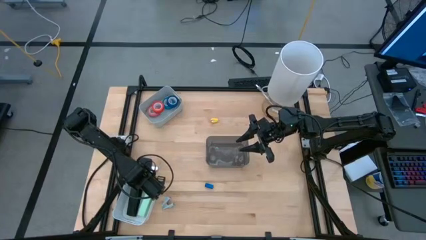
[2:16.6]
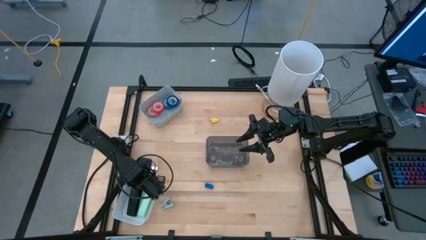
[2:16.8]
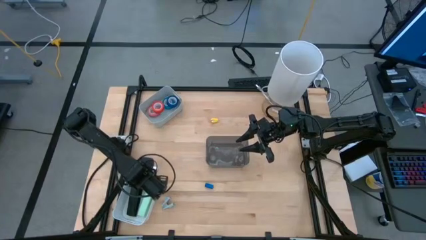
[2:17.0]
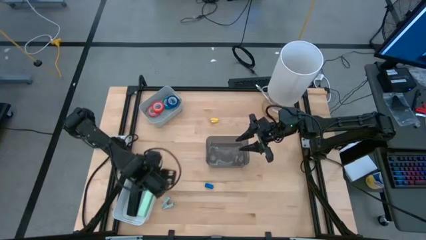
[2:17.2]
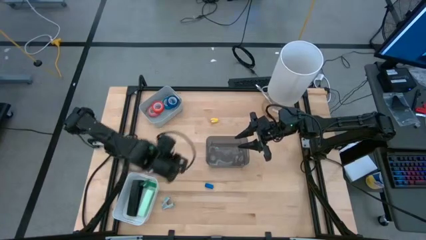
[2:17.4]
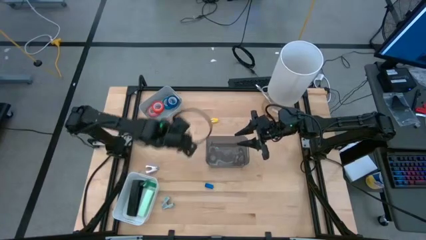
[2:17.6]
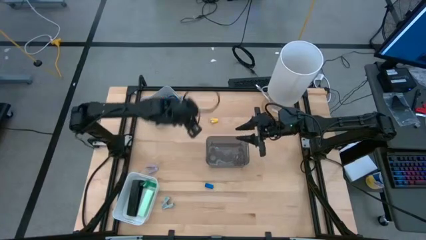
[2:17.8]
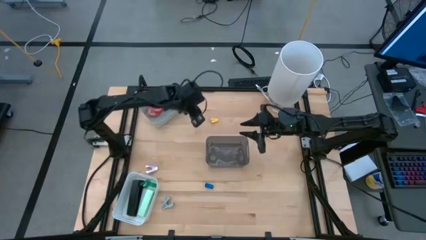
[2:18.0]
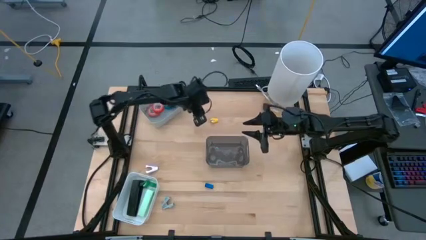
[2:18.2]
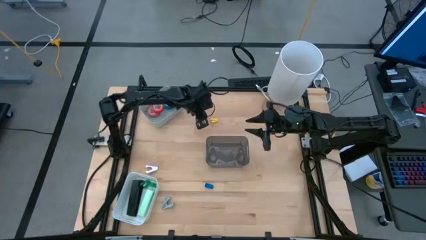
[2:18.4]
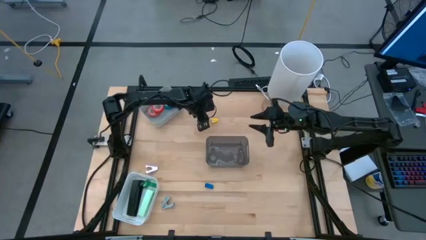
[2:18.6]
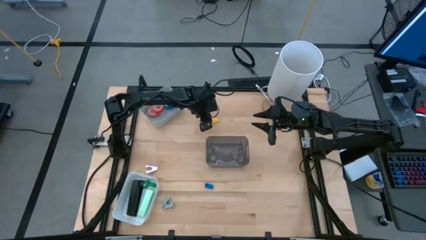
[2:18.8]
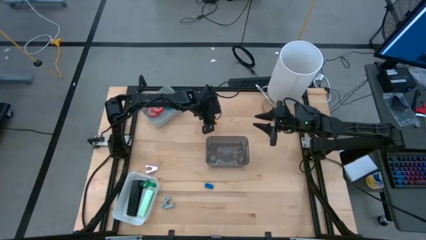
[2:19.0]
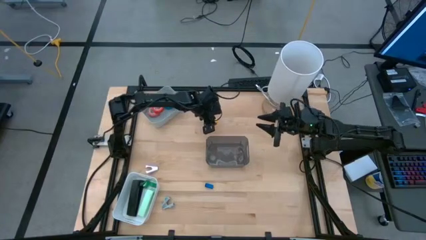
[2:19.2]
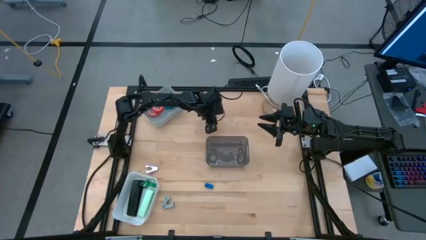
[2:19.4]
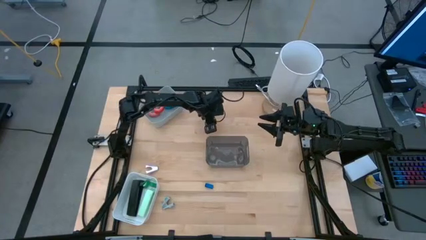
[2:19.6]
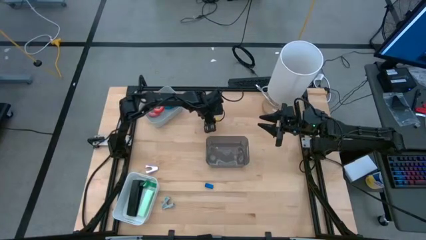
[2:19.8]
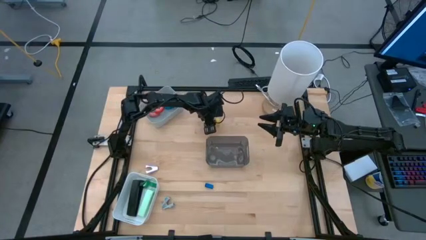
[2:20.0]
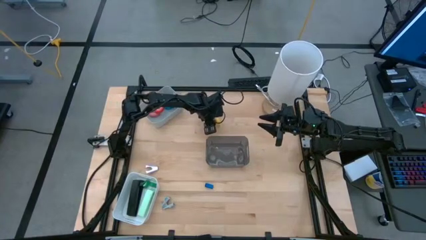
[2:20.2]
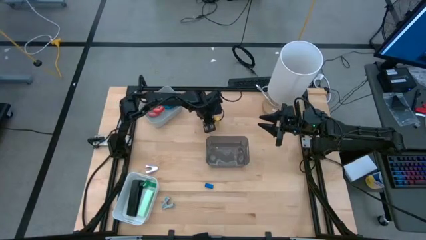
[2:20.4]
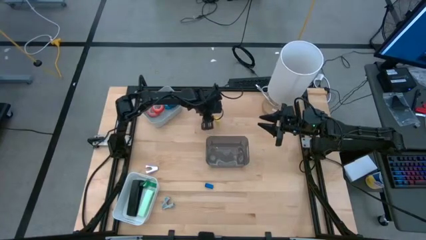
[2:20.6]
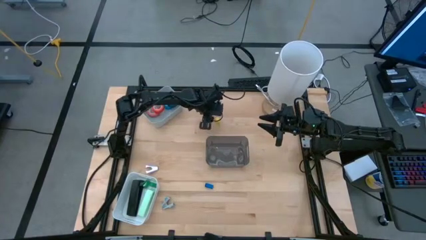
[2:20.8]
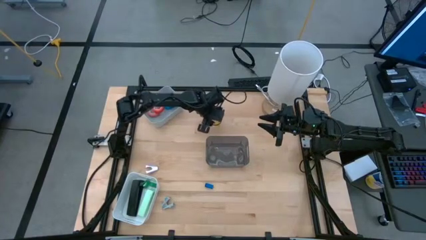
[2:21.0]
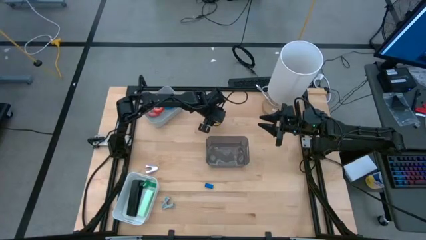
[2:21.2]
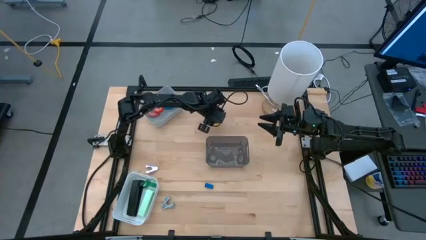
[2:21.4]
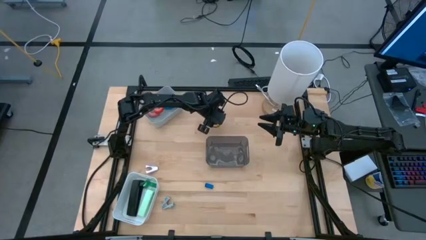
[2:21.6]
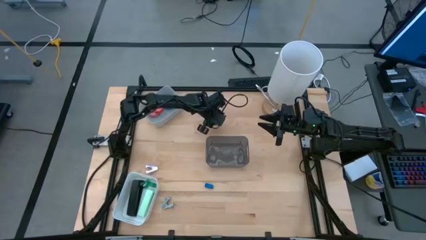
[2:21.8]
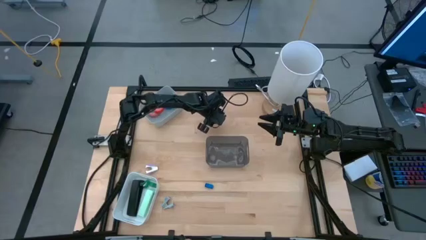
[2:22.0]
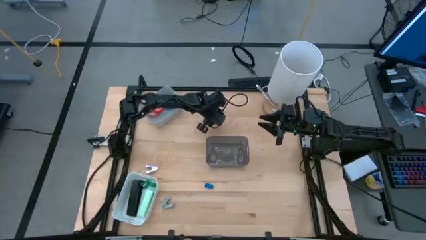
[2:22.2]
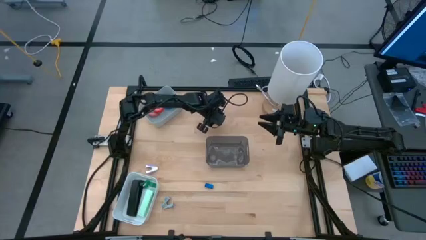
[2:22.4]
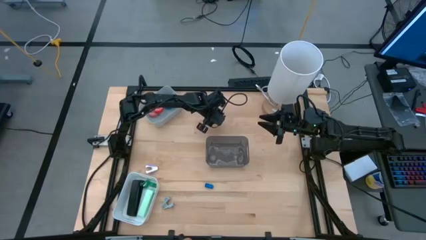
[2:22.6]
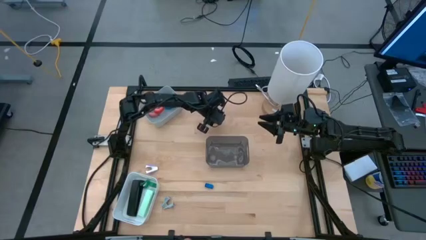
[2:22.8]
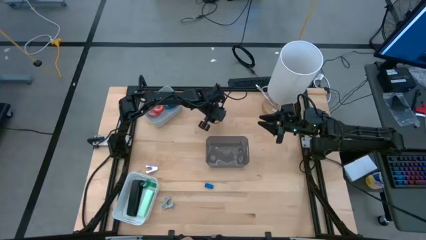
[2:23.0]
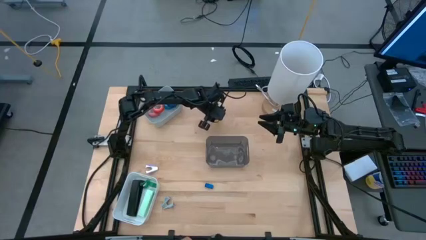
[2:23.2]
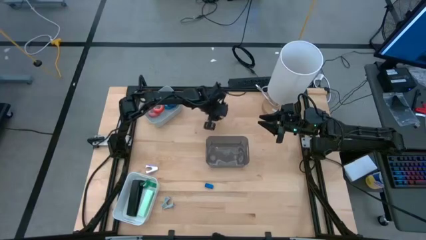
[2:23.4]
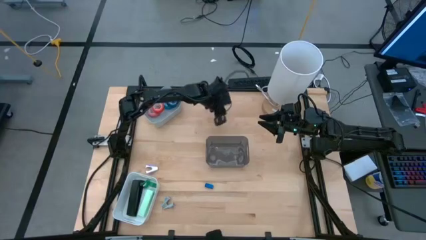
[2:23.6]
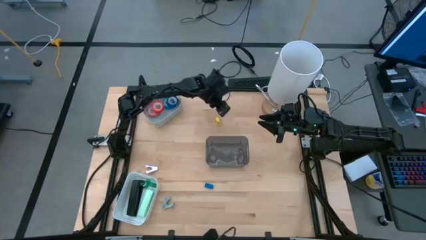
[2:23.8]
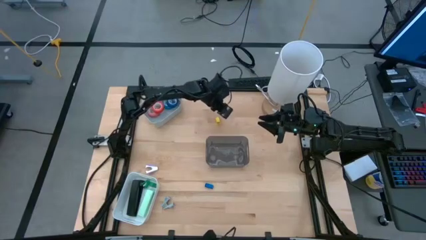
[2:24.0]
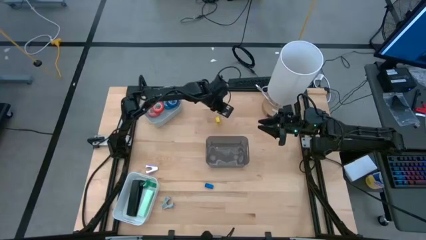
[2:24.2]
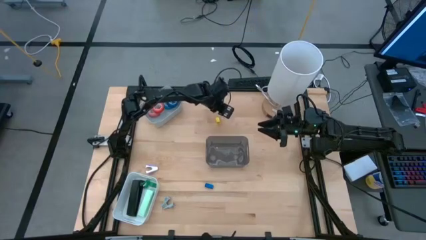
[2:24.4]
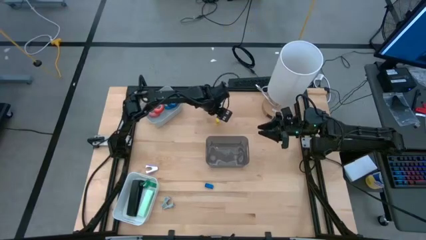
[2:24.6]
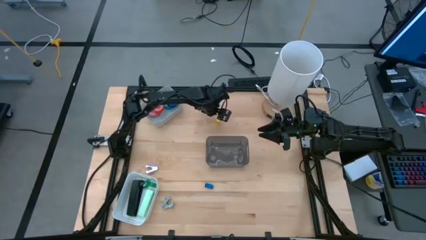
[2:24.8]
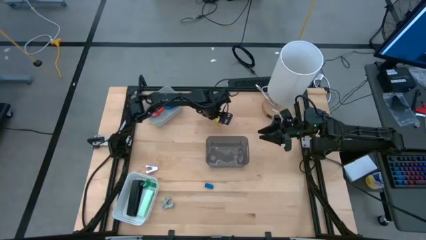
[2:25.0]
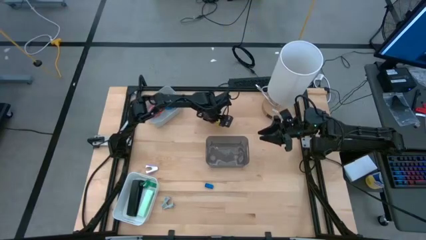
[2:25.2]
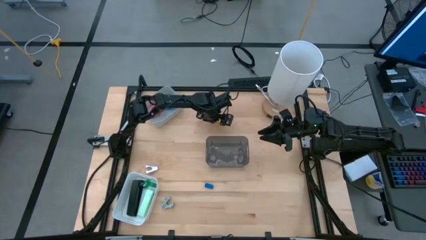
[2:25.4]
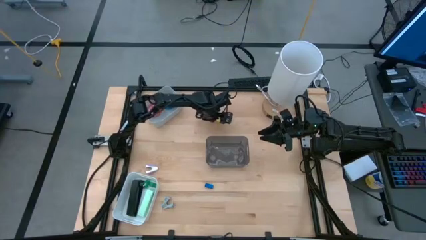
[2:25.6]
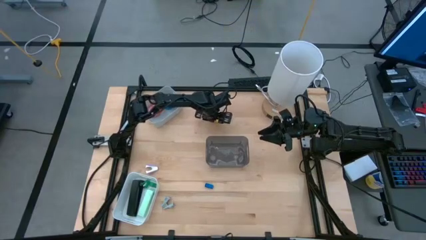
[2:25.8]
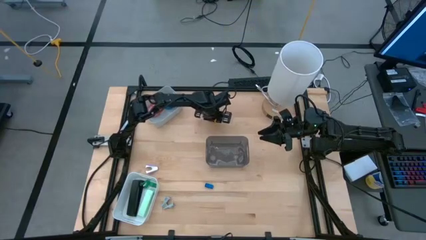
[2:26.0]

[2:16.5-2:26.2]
Task: Pick and place Stapler, Stapler remover, tape
Put the small yellow stapler into the white bin

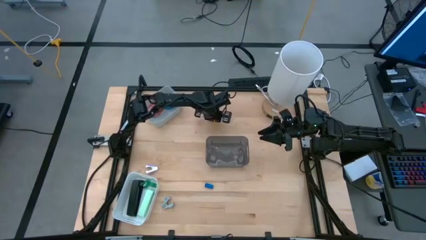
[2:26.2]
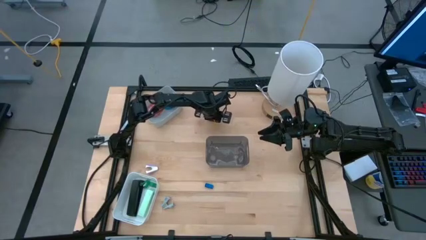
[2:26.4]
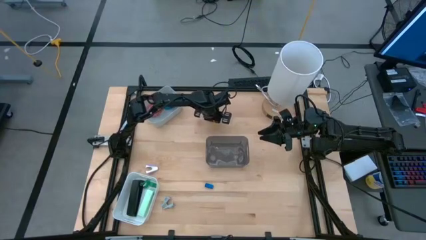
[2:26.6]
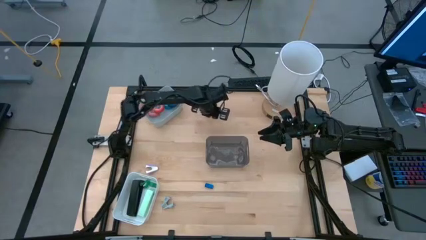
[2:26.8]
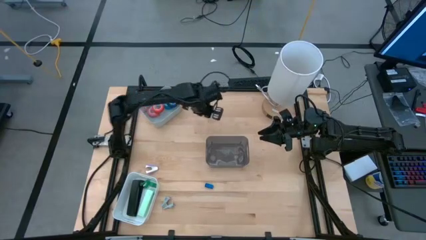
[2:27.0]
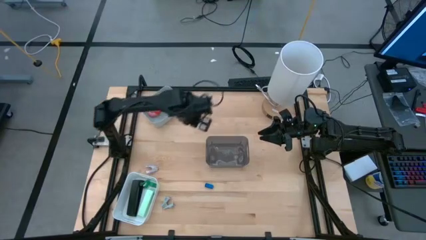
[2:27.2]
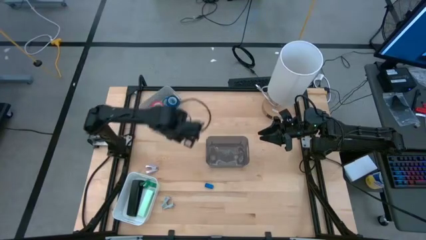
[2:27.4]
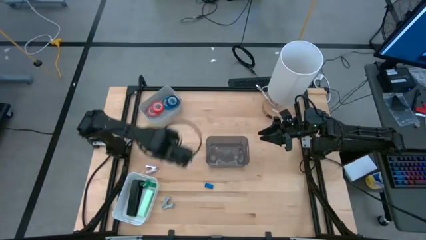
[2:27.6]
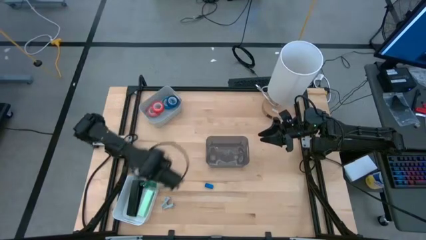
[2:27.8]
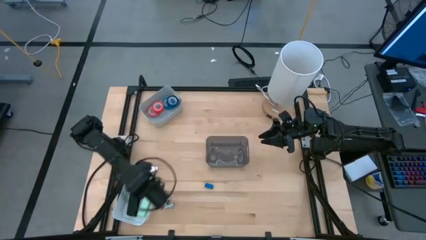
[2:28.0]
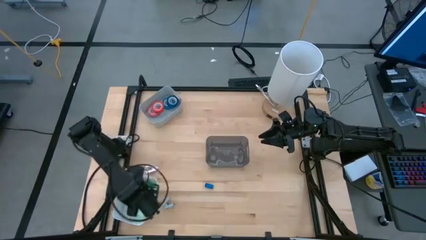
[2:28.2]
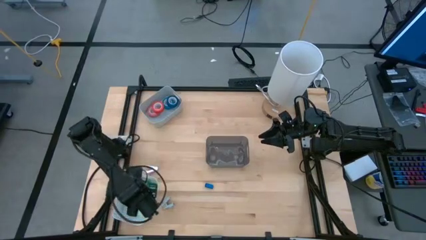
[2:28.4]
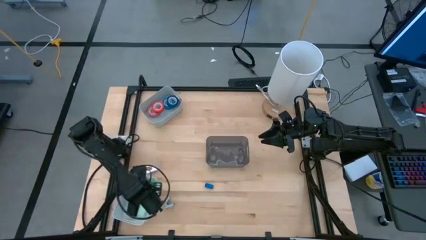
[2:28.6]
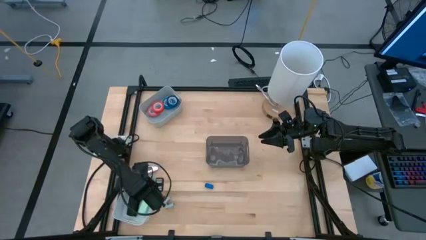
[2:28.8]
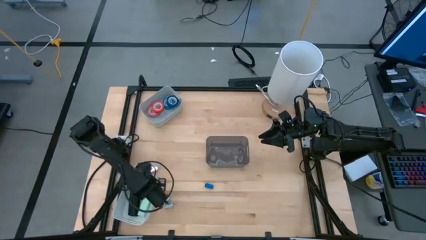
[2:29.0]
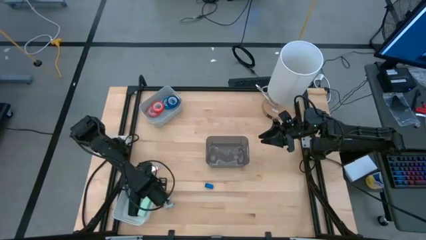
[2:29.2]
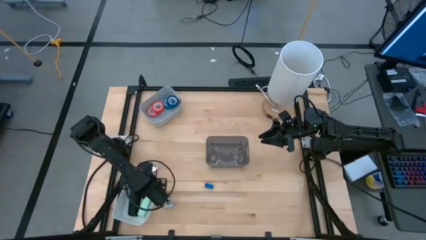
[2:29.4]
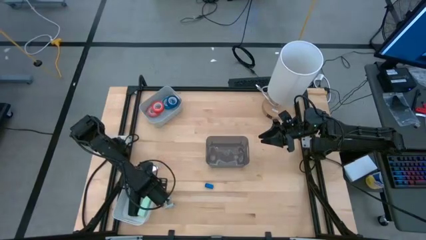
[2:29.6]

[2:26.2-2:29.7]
Put the small yellow stapler into the white bin

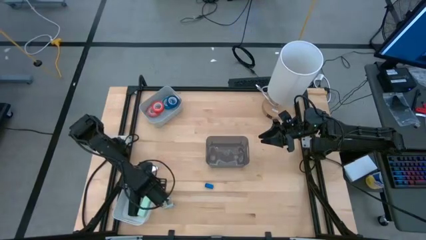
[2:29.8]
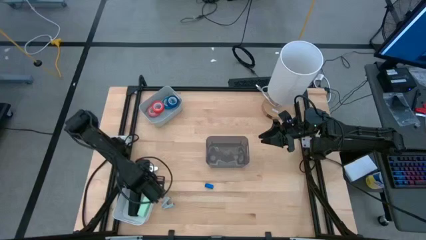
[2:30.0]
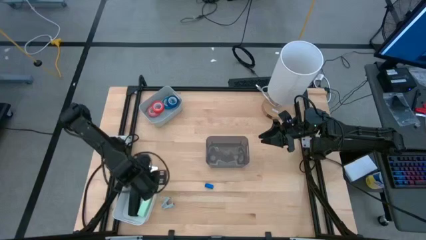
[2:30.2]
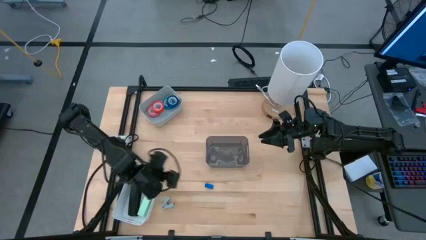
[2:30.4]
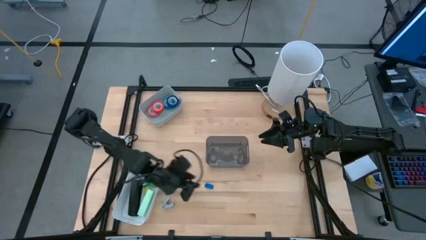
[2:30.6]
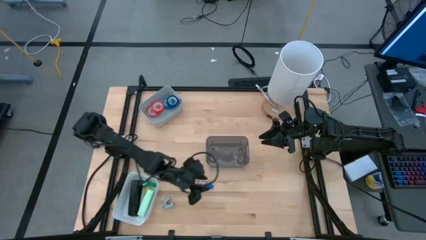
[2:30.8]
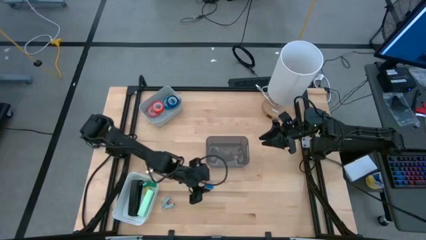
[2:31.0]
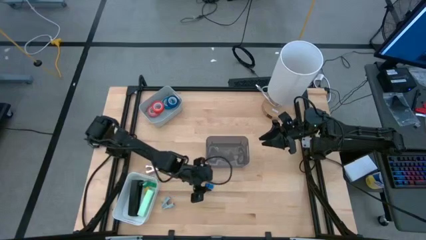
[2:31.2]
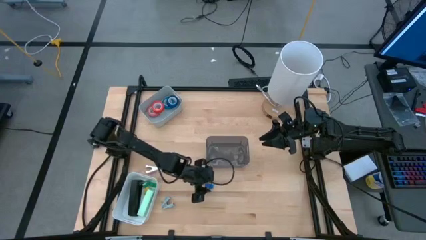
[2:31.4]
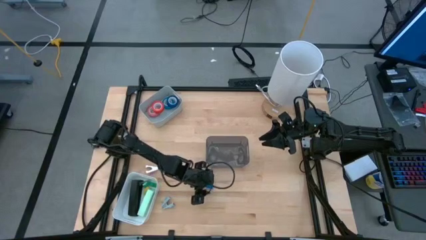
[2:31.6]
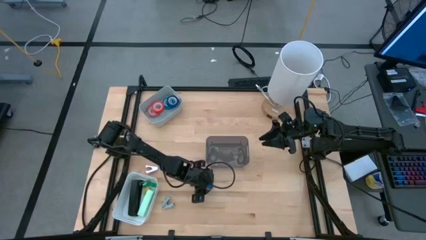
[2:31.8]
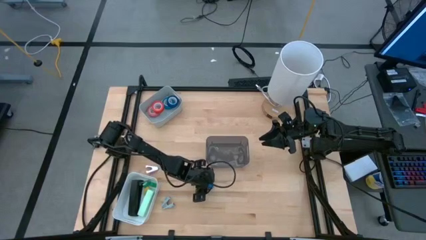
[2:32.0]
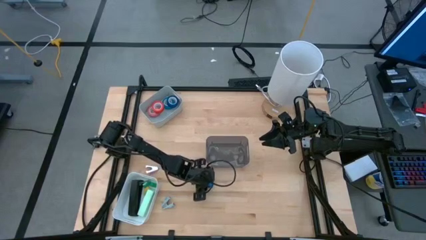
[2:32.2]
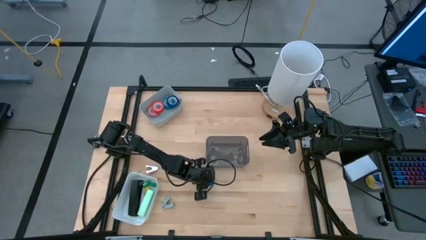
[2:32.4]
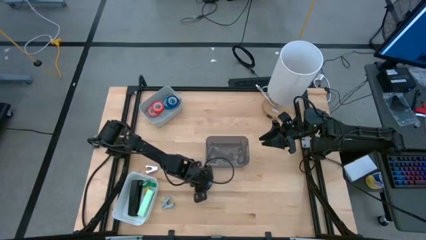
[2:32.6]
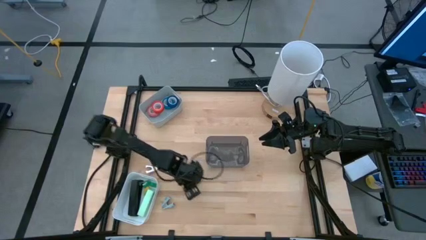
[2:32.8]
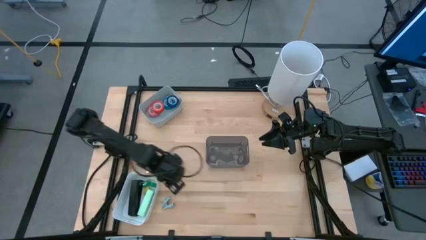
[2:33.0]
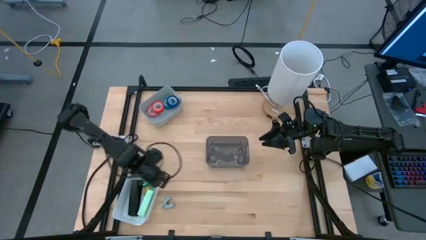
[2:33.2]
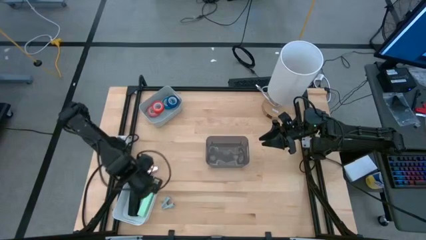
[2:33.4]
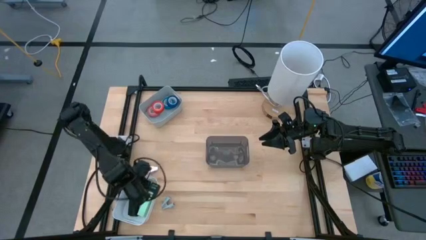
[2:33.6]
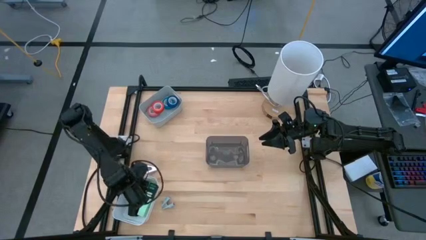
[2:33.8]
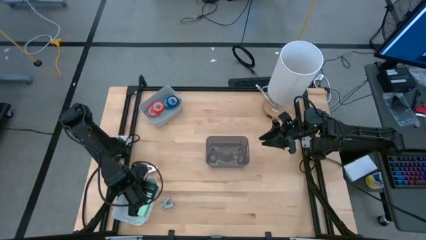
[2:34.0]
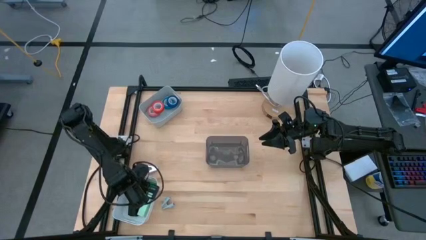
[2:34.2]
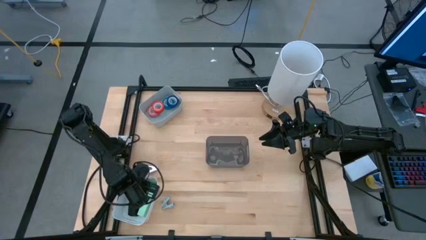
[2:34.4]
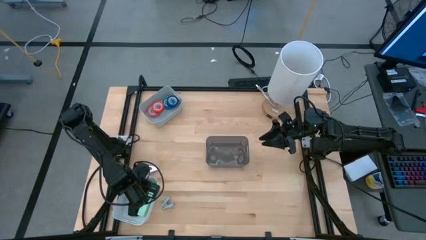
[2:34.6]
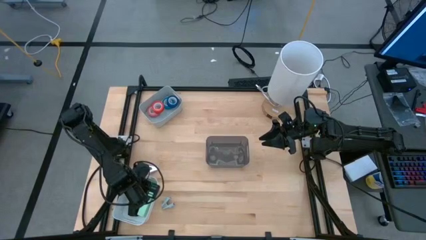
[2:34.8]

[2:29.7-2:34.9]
Put the small dark blue stapler into the white bin
